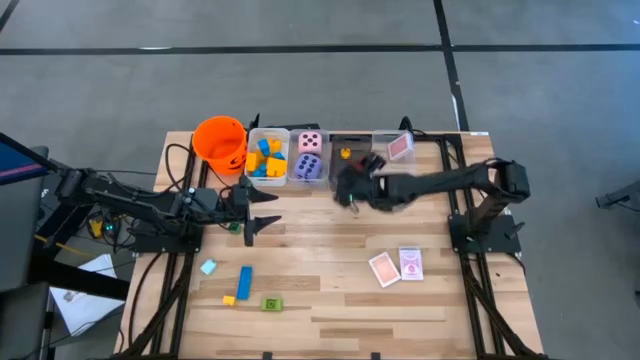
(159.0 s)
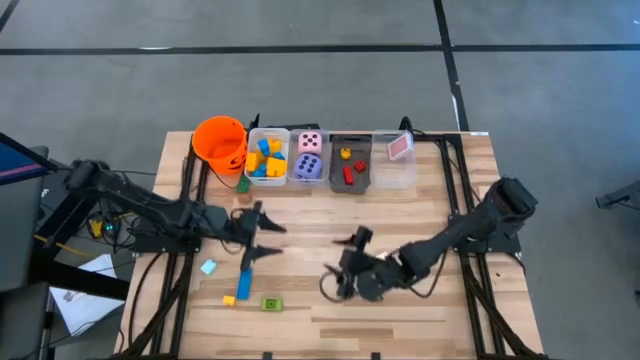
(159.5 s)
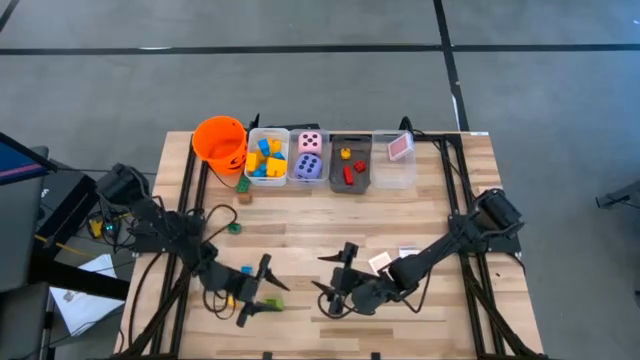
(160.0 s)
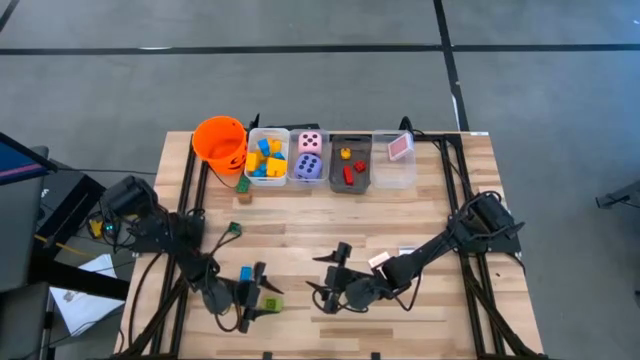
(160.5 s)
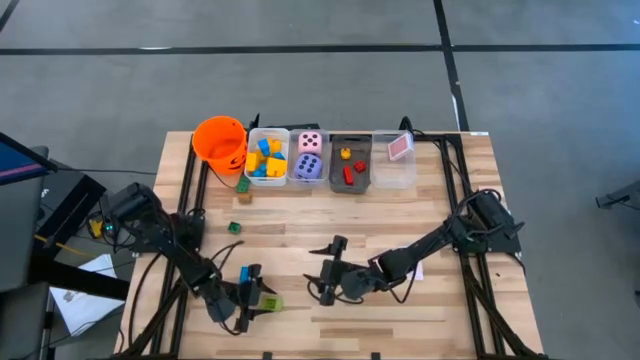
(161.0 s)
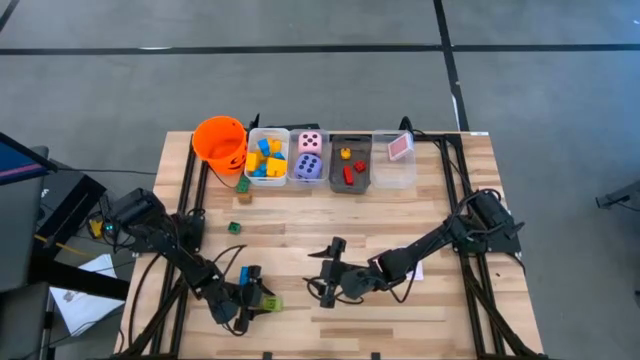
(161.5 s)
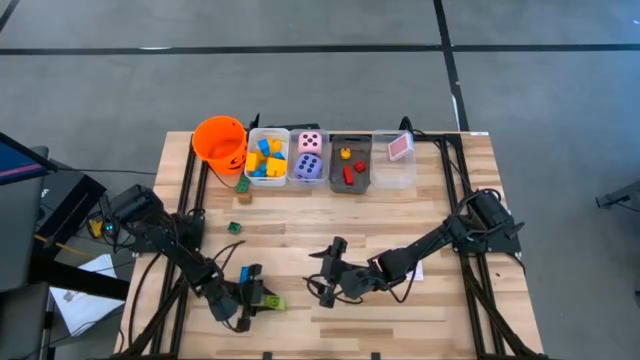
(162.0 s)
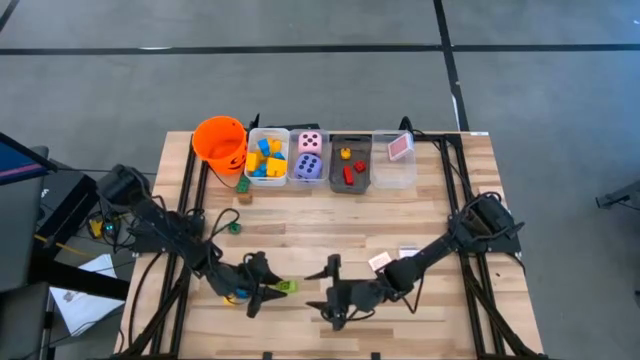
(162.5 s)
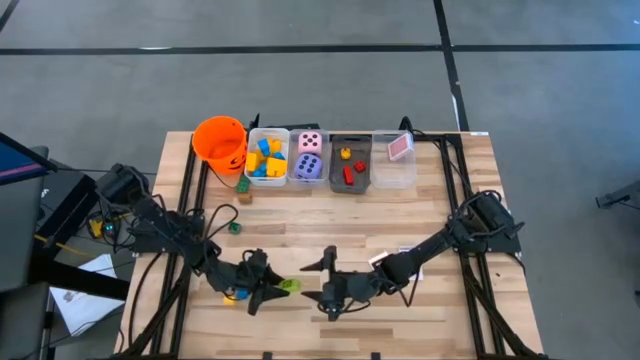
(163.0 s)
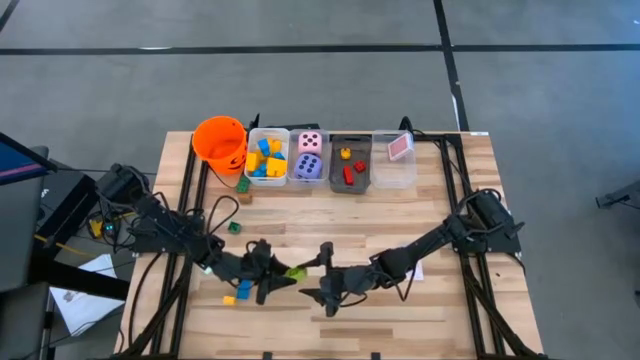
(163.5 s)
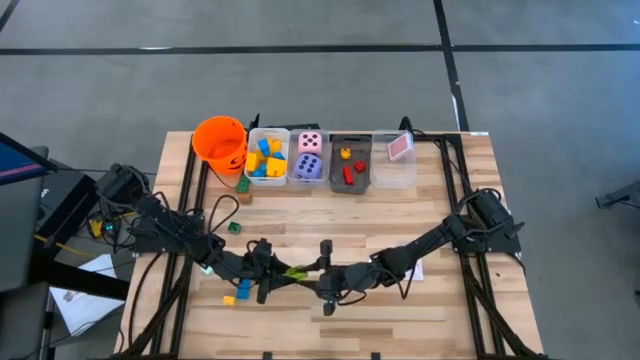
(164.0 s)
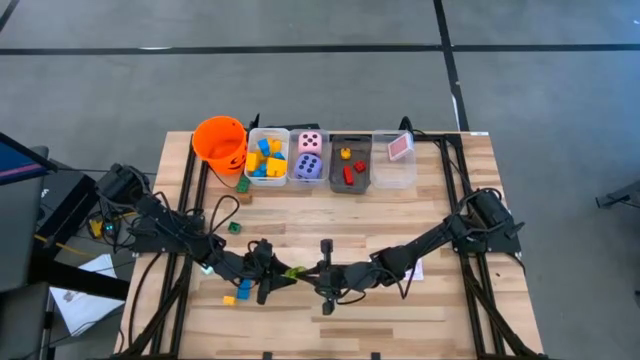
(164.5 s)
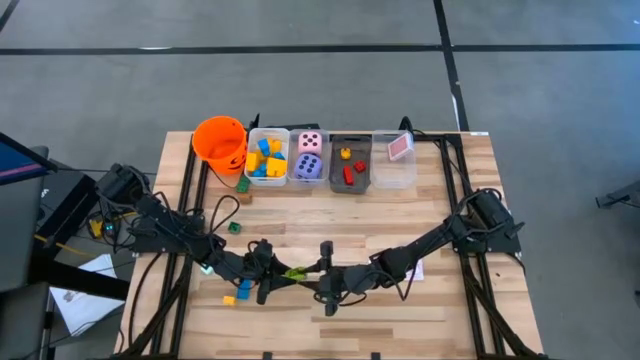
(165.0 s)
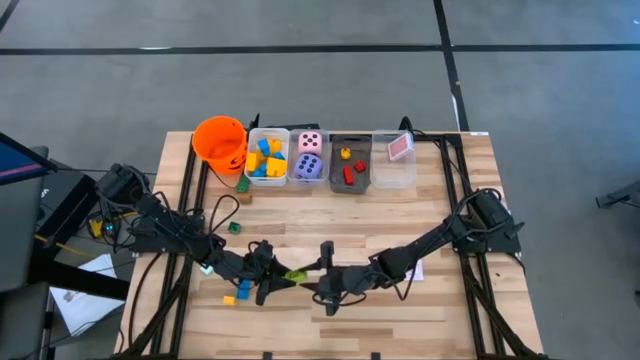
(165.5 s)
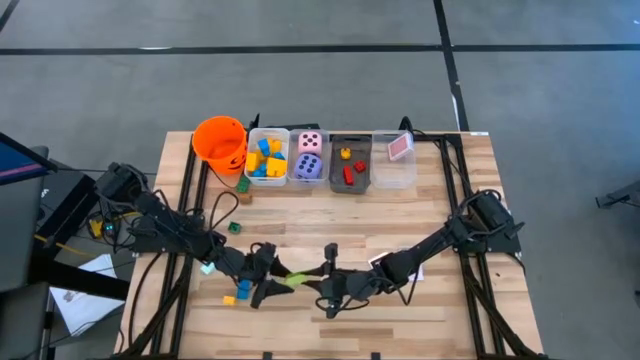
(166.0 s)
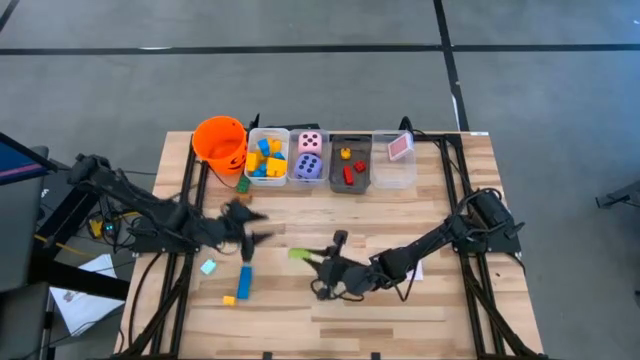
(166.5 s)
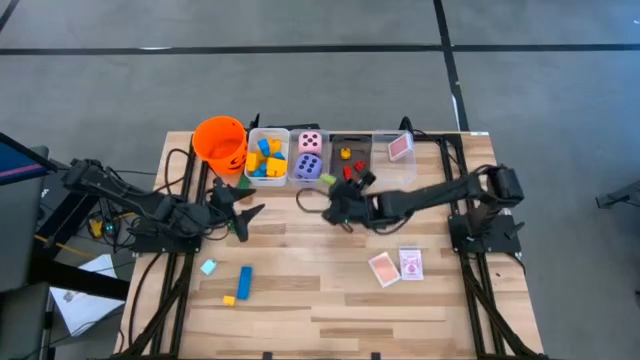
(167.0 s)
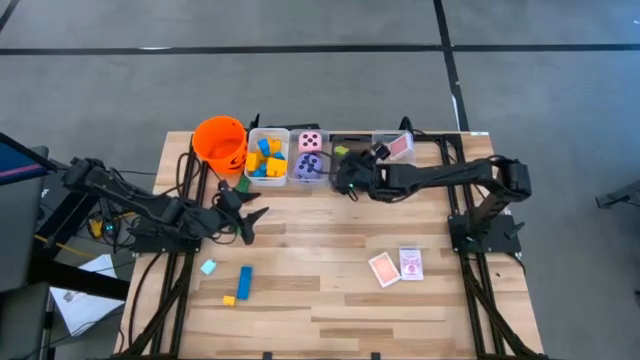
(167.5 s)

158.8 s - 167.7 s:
Task: Pick & Place Toys
Put the green game piece into the black bin

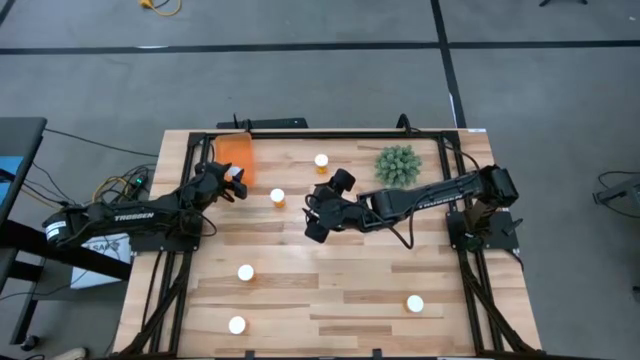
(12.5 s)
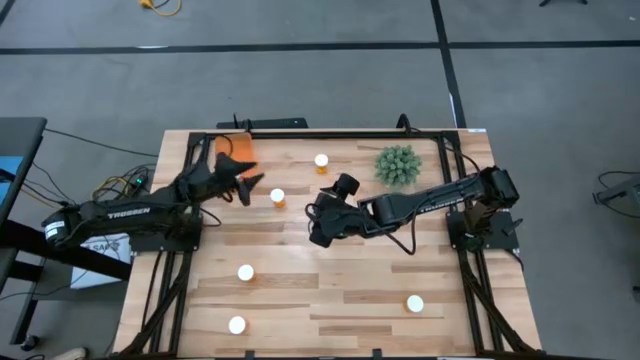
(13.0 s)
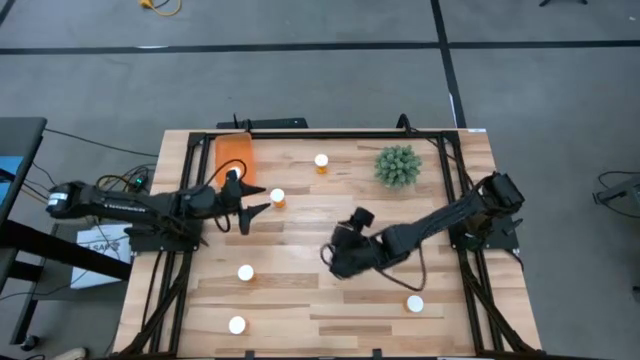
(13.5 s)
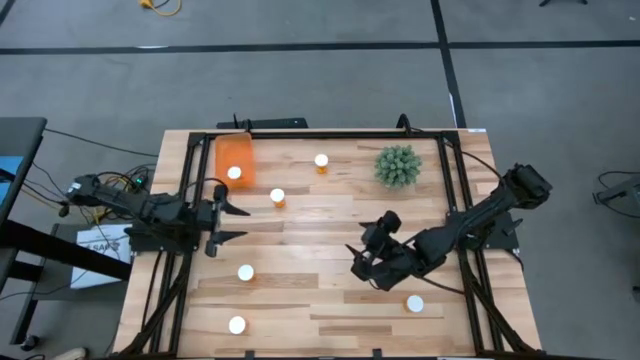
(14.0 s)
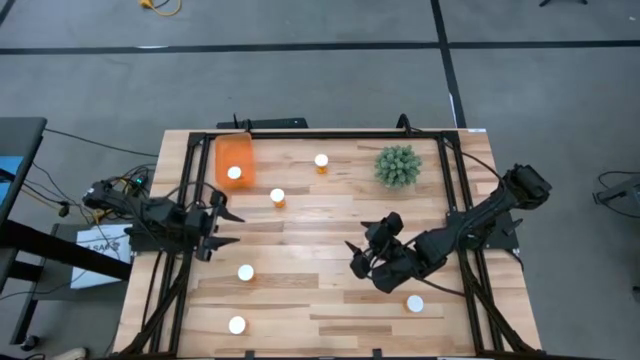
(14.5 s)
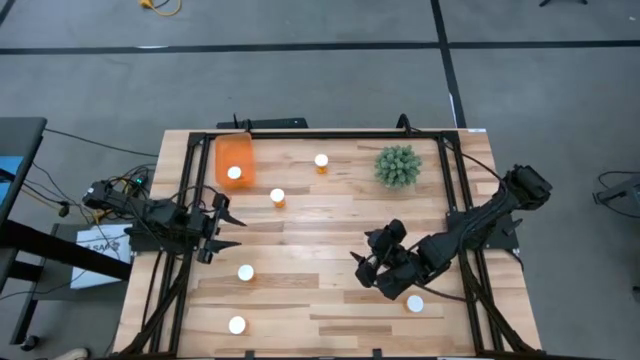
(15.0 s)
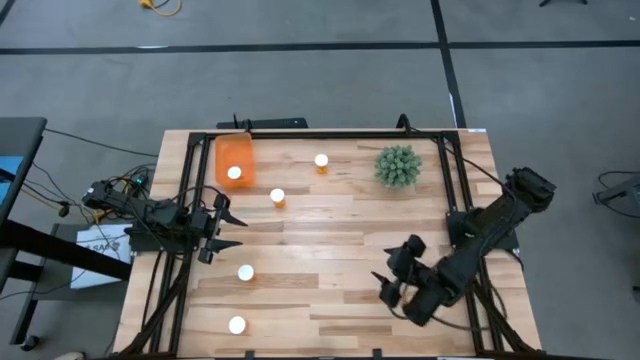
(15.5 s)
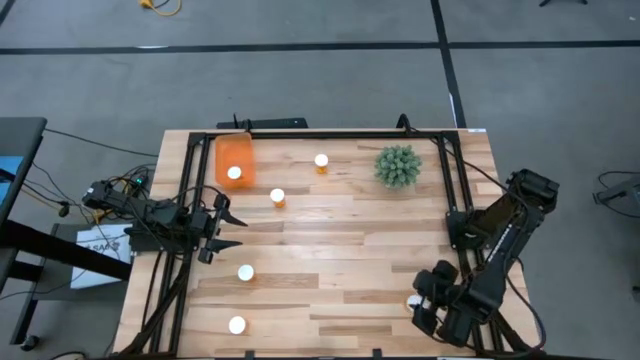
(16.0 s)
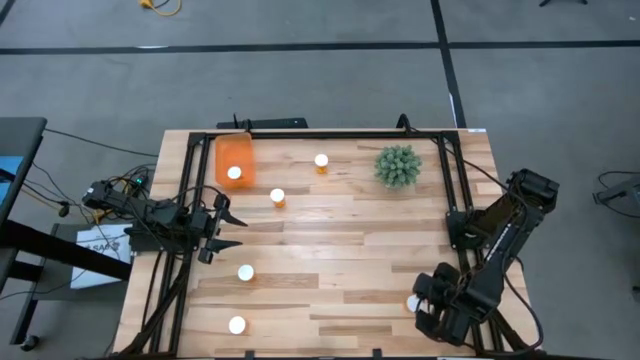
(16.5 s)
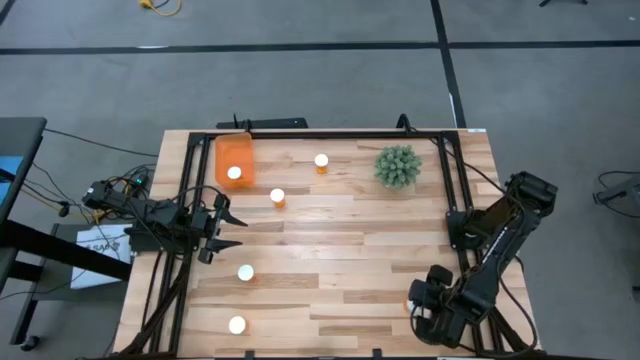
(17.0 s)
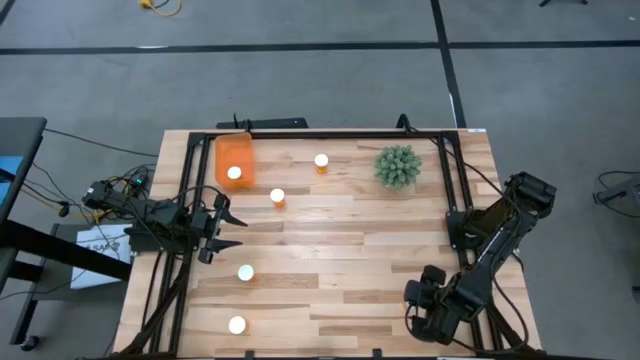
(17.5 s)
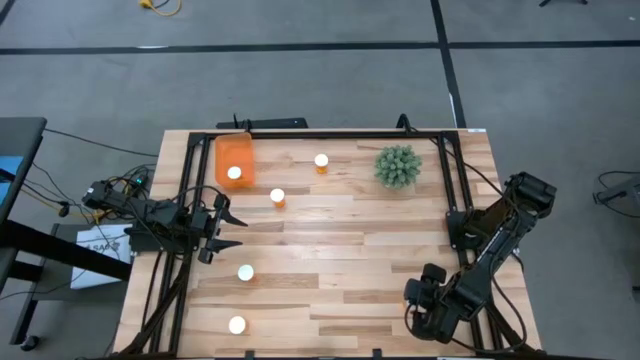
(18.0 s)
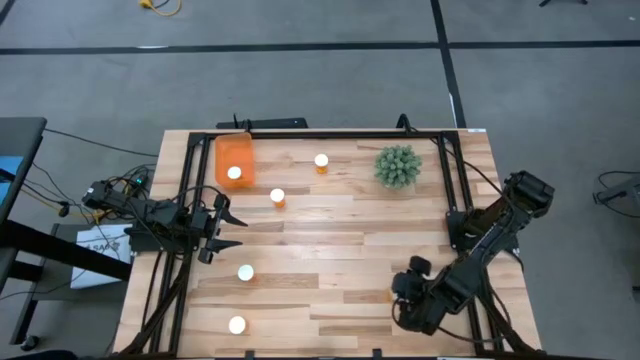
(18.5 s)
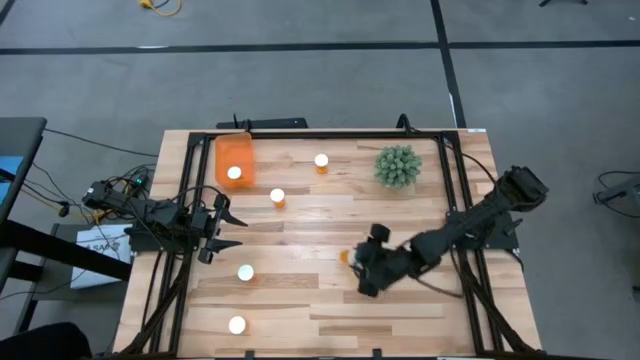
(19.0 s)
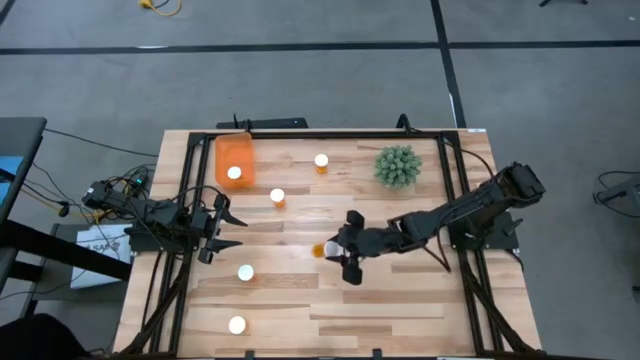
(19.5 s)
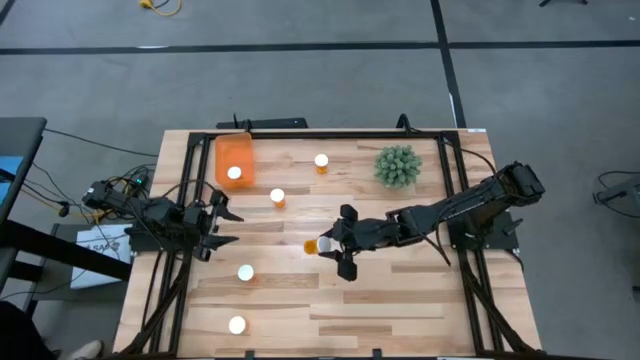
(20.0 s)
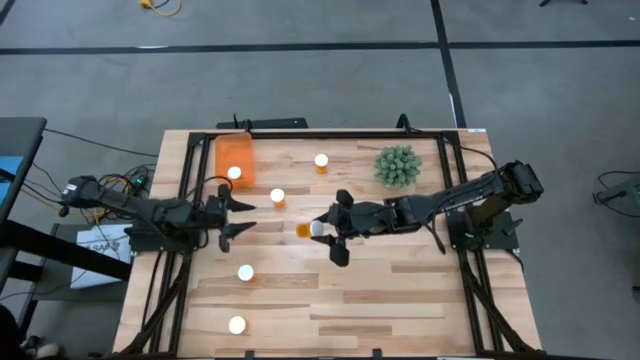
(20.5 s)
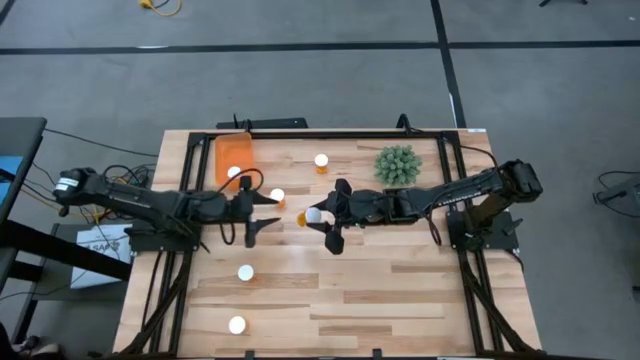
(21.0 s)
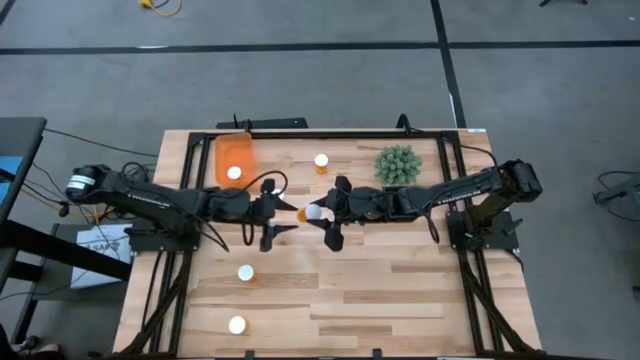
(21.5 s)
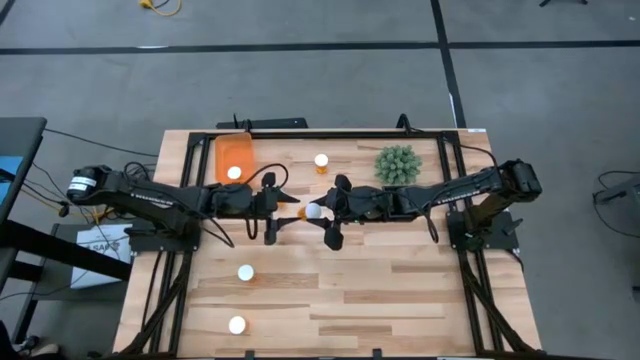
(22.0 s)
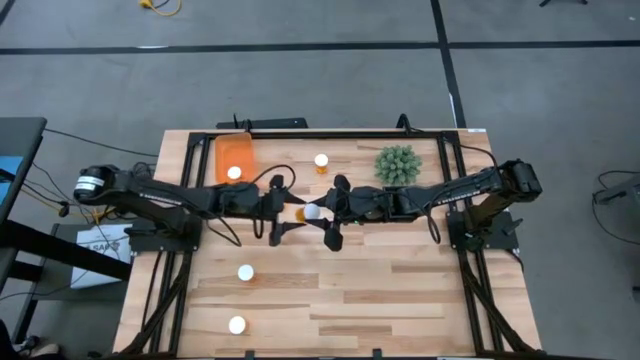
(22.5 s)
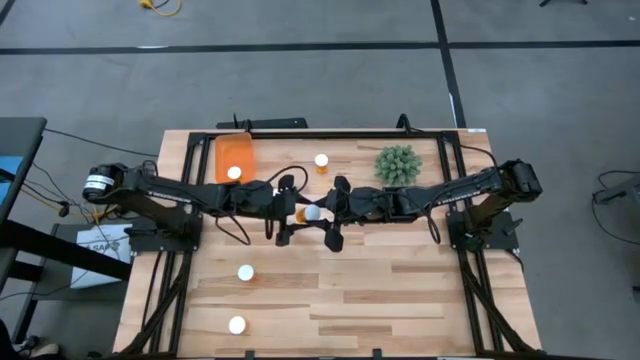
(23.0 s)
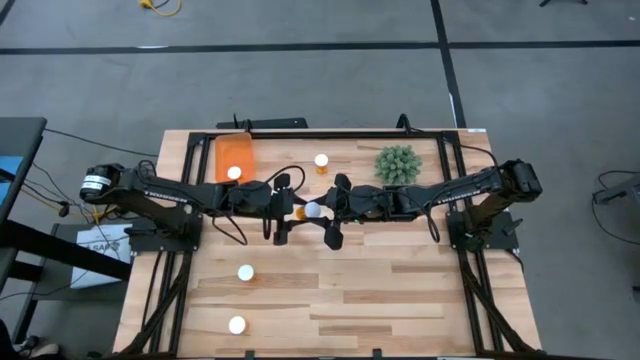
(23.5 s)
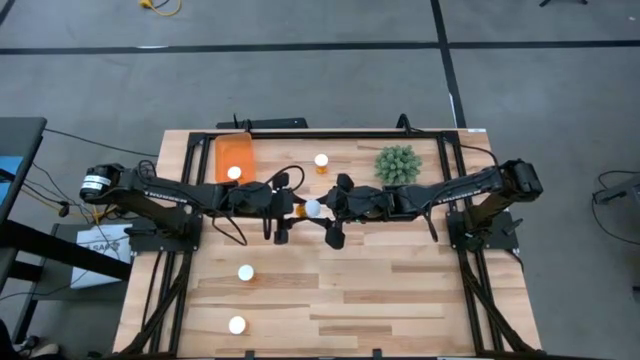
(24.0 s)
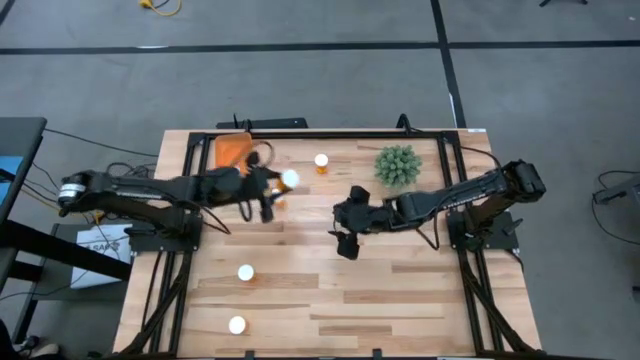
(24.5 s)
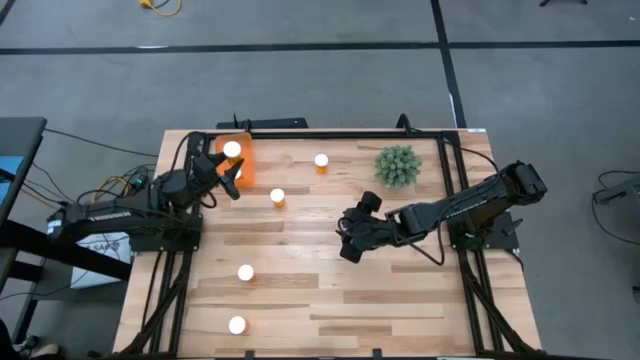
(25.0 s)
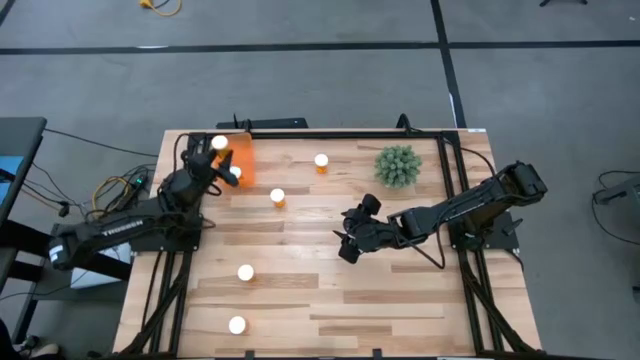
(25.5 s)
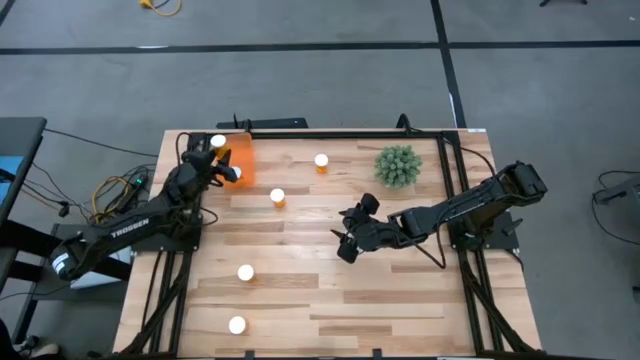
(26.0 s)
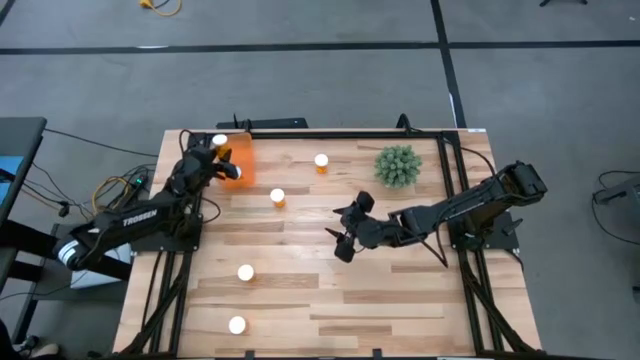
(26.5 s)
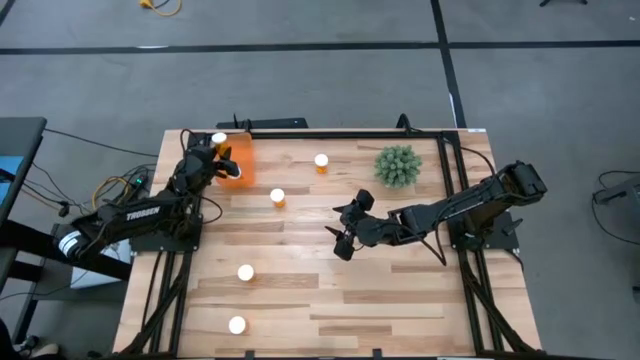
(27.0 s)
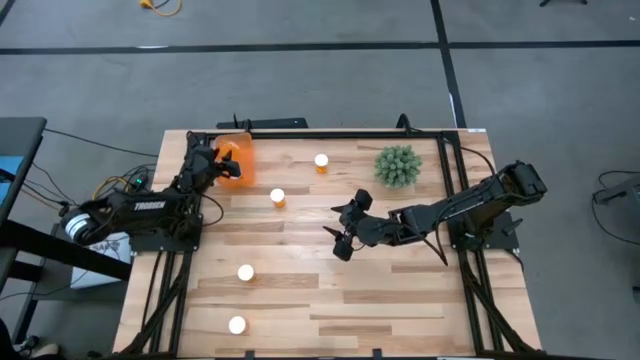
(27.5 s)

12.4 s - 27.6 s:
Task: Pick and place pill bottles into a basket
Put the orange pill bottle into the orange container
